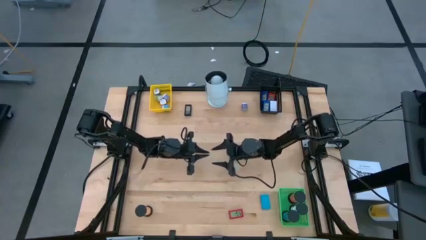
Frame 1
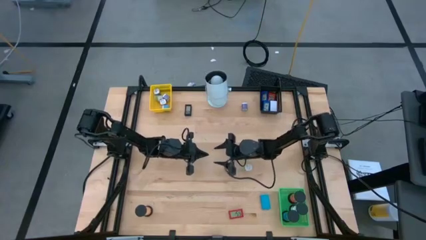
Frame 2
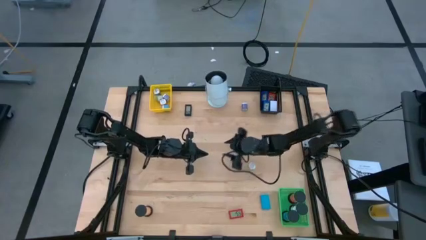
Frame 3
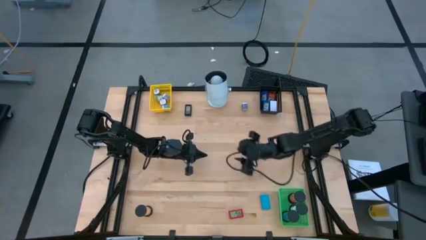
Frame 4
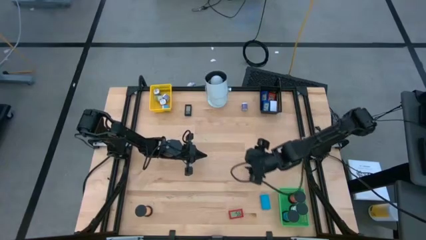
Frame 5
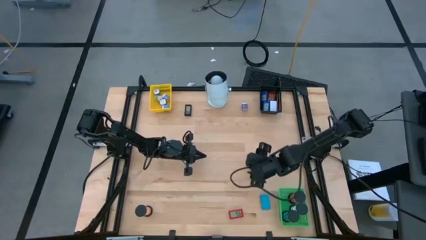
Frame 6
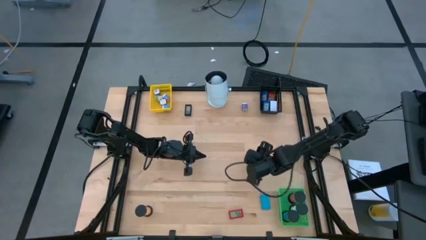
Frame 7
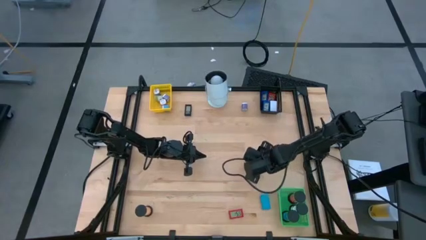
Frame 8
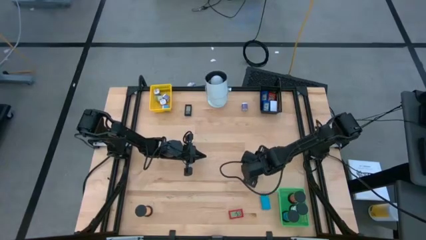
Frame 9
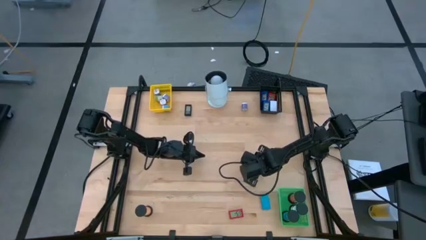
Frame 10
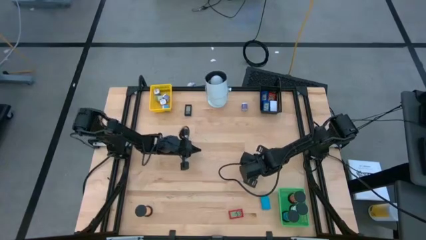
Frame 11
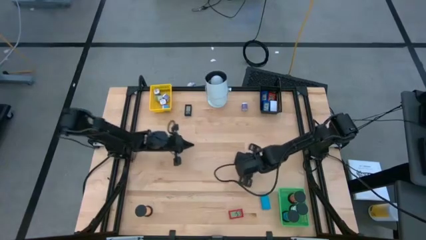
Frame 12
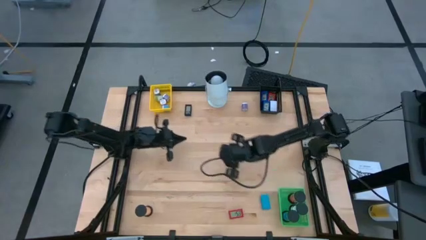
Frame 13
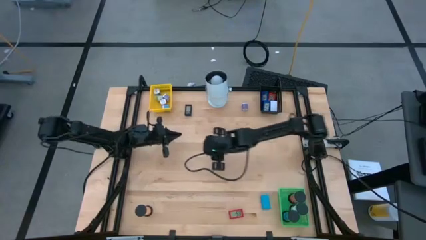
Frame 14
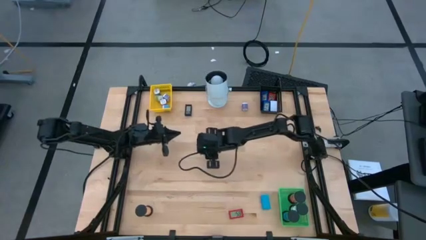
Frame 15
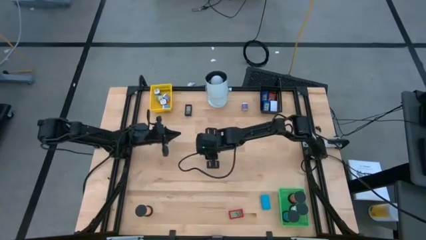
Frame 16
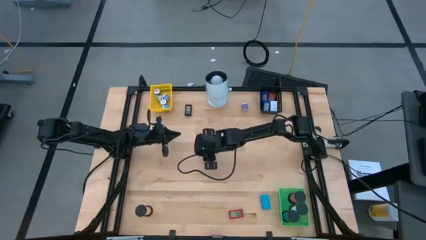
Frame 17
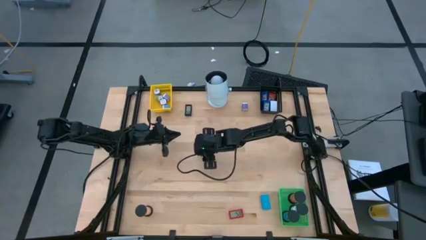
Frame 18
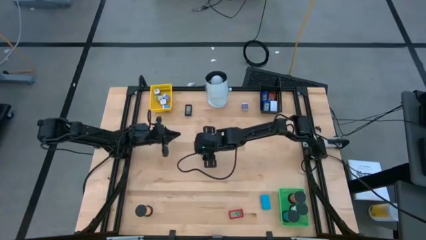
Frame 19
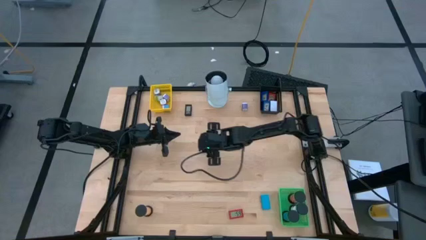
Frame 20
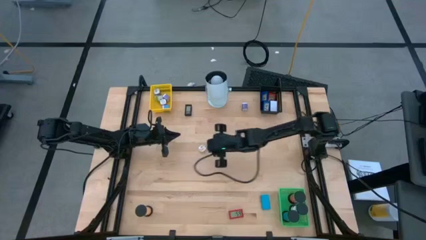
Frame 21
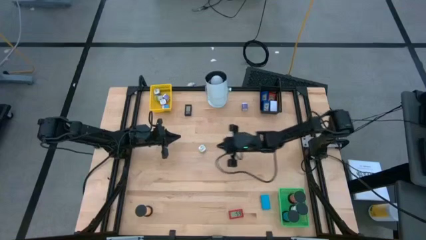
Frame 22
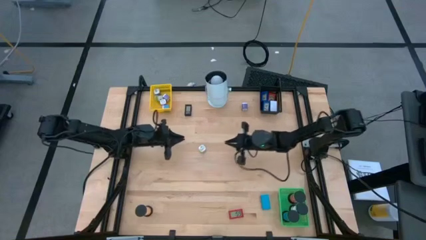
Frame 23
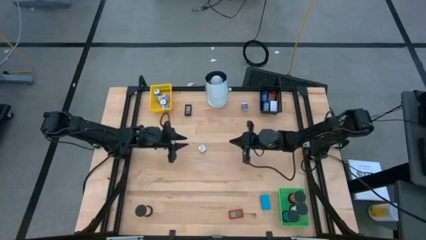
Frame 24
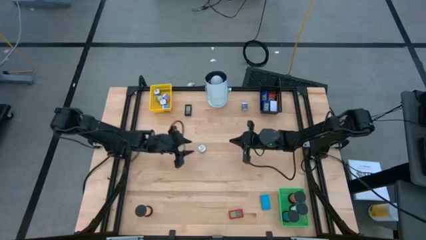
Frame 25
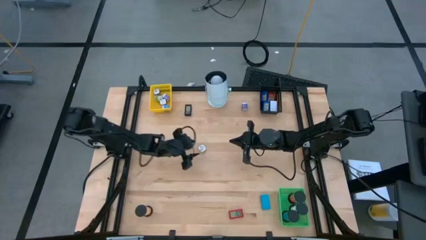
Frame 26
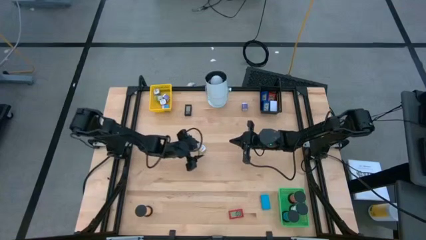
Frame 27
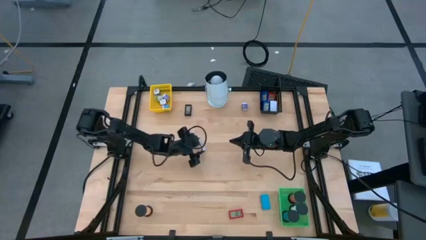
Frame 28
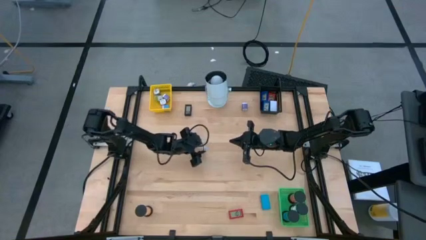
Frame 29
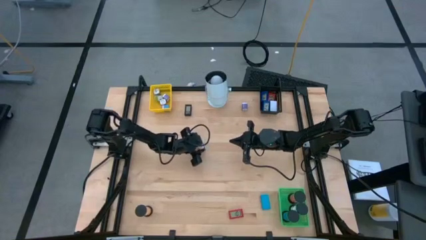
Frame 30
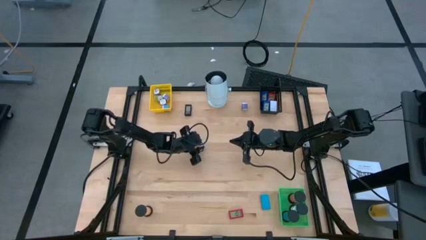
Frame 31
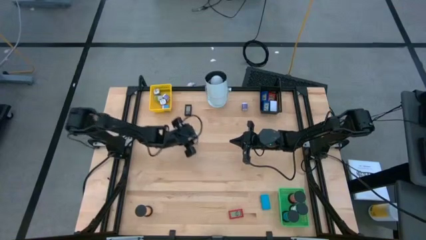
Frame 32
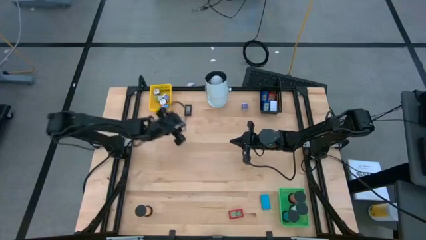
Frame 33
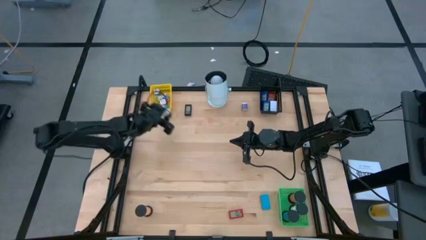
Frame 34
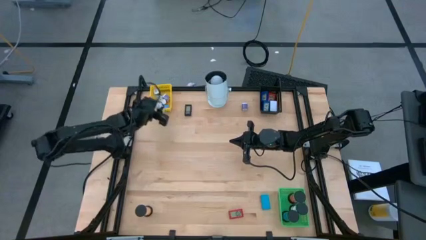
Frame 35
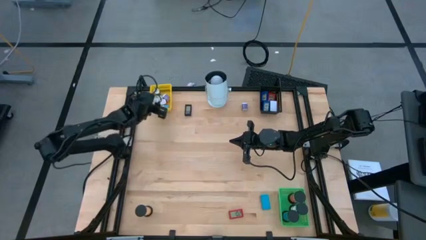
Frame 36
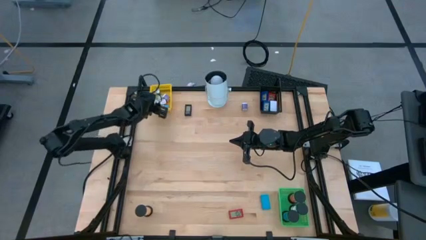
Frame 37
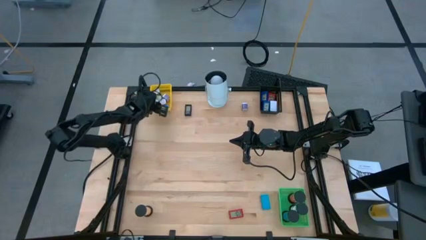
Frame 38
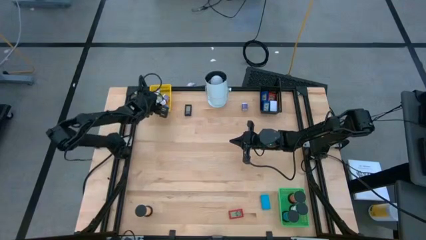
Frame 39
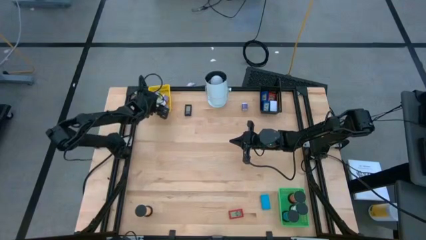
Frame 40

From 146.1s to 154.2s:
Task: Pick & Place Office items
Put the green charger adapter into the yellow bin

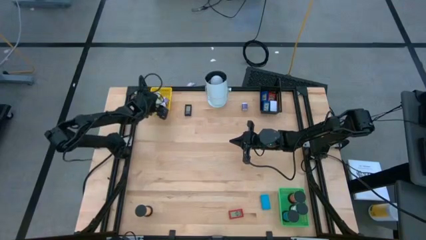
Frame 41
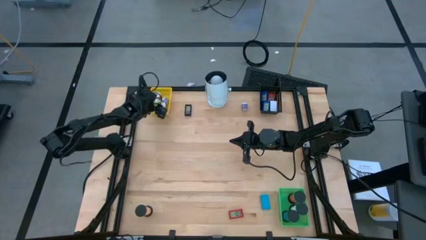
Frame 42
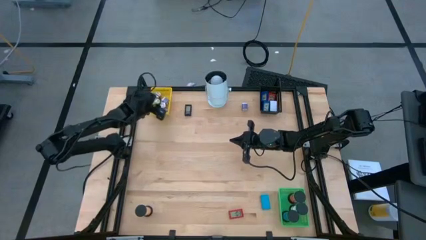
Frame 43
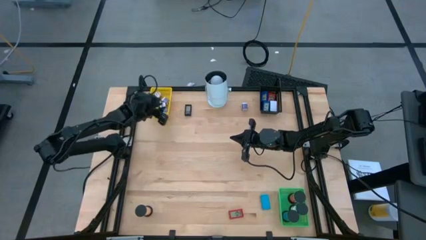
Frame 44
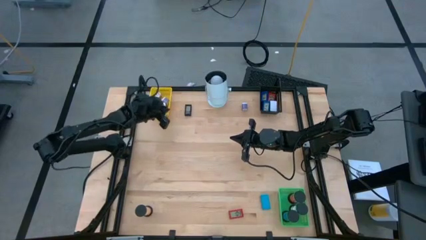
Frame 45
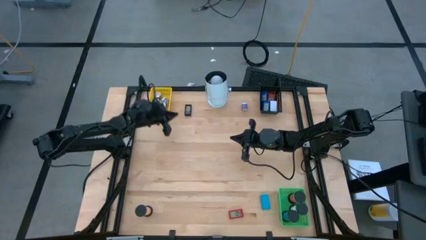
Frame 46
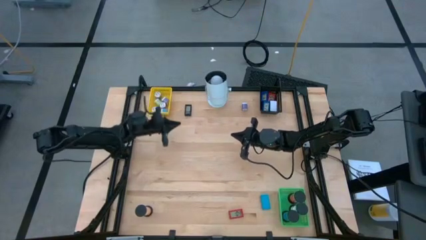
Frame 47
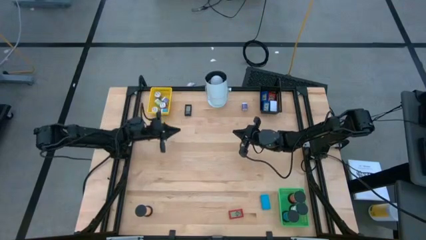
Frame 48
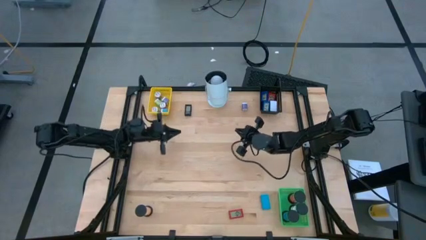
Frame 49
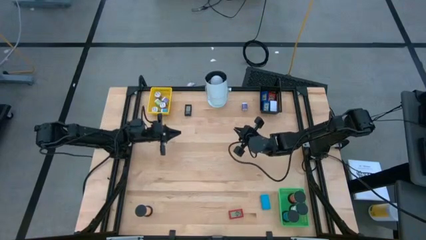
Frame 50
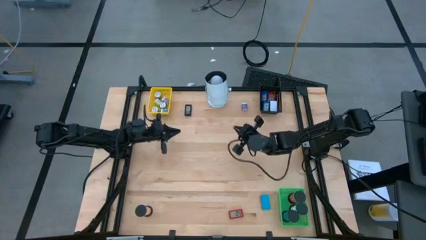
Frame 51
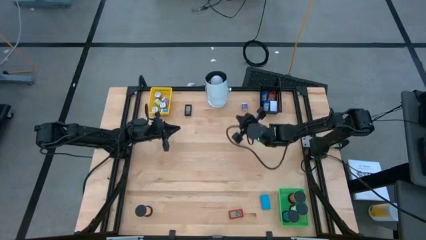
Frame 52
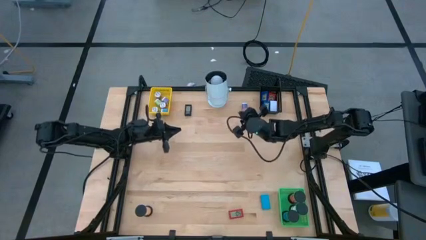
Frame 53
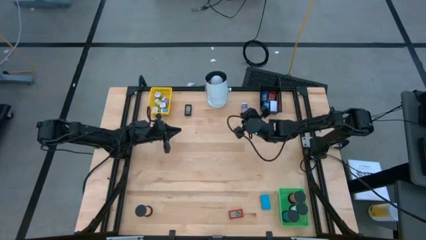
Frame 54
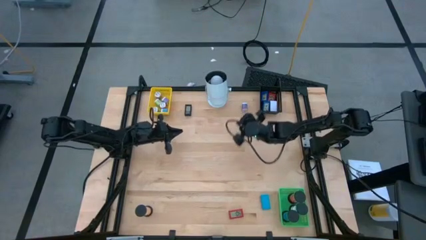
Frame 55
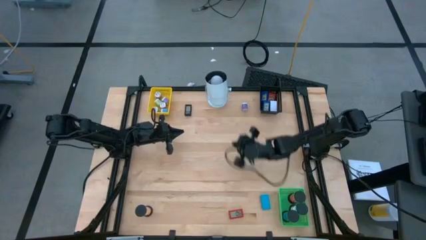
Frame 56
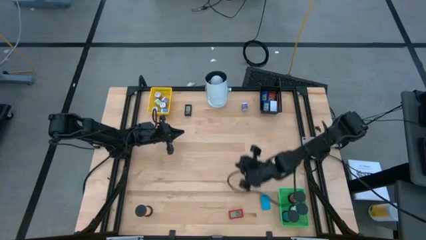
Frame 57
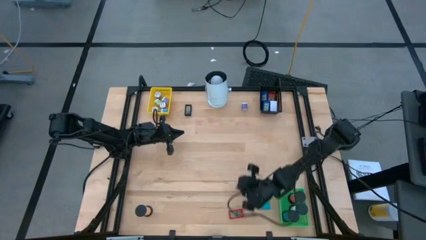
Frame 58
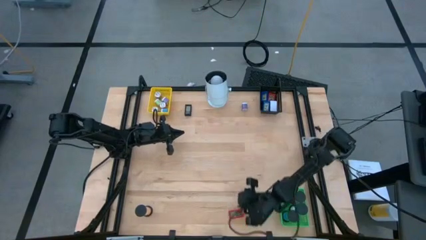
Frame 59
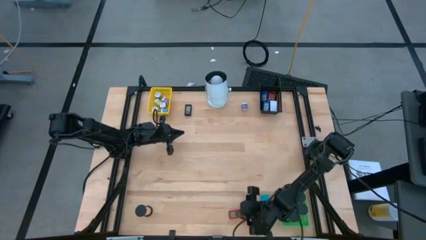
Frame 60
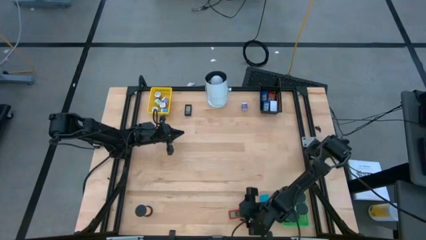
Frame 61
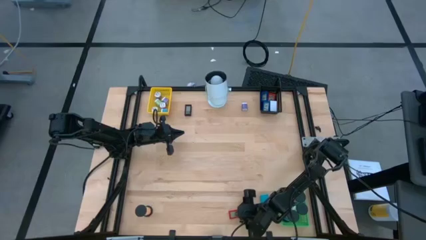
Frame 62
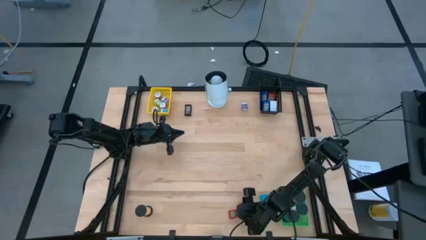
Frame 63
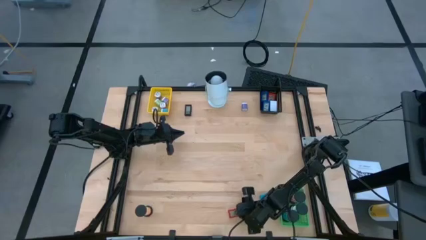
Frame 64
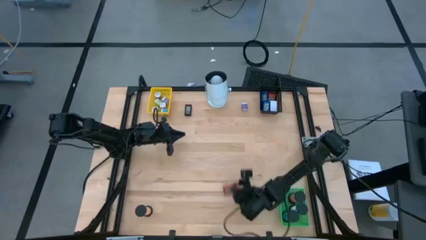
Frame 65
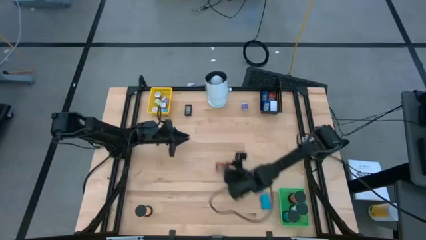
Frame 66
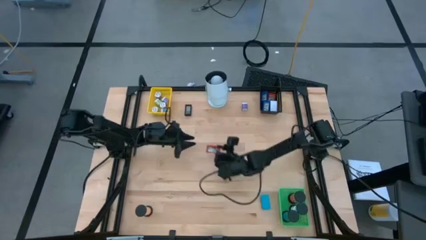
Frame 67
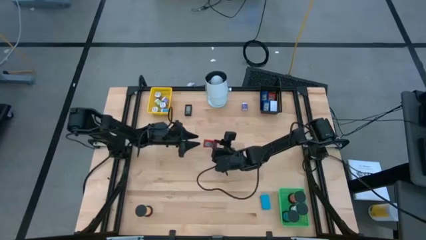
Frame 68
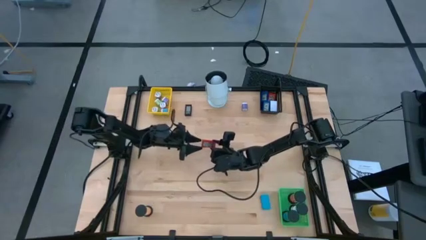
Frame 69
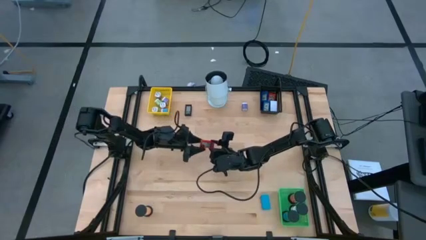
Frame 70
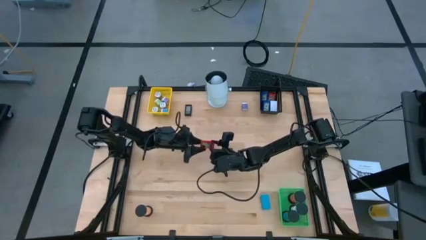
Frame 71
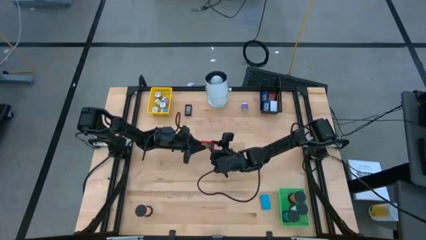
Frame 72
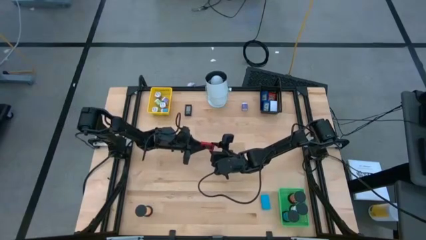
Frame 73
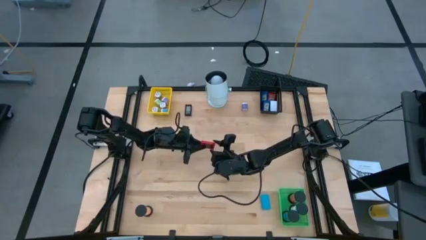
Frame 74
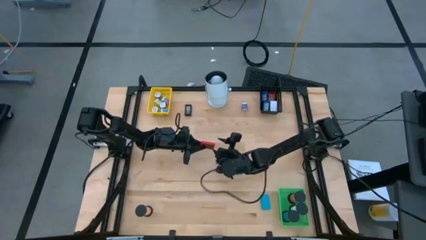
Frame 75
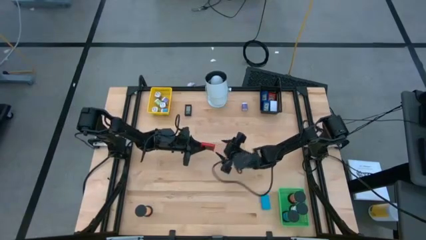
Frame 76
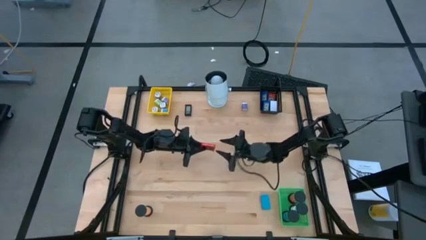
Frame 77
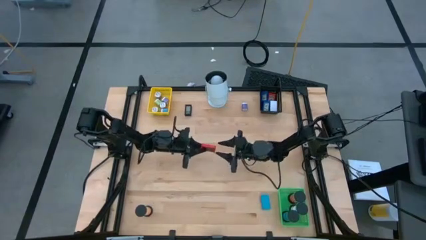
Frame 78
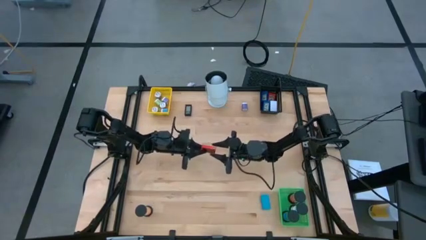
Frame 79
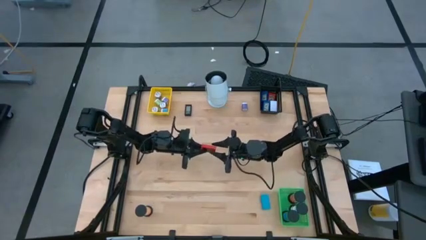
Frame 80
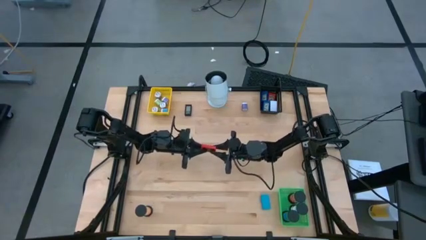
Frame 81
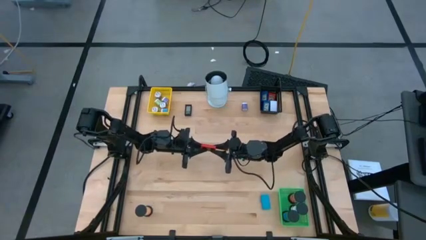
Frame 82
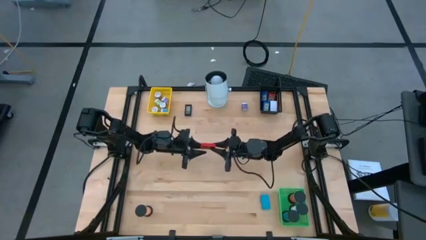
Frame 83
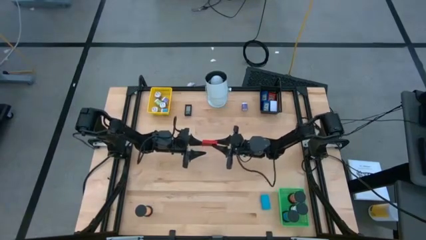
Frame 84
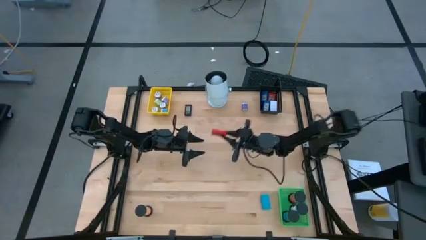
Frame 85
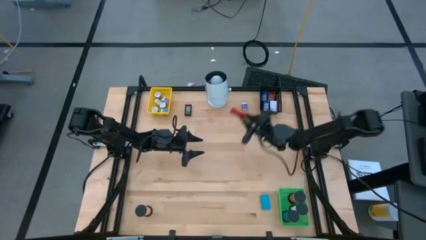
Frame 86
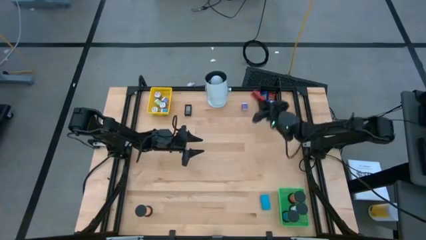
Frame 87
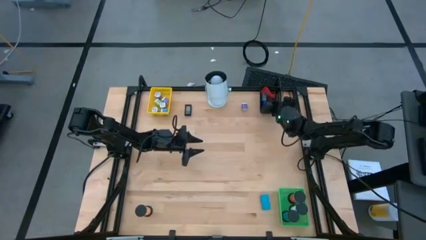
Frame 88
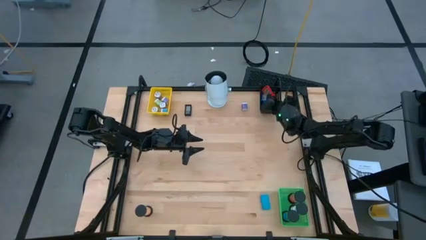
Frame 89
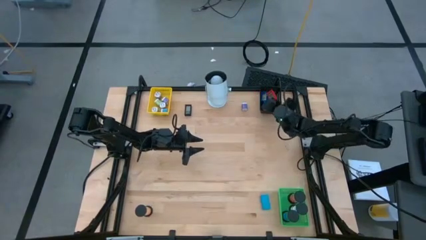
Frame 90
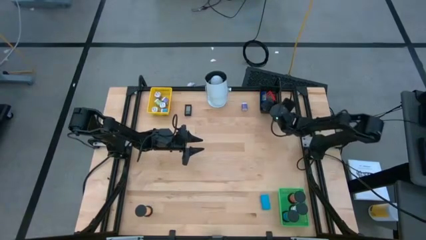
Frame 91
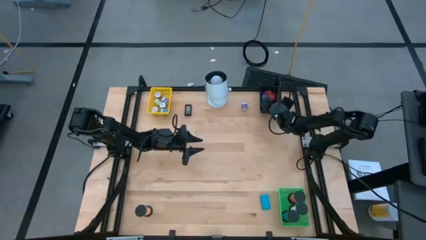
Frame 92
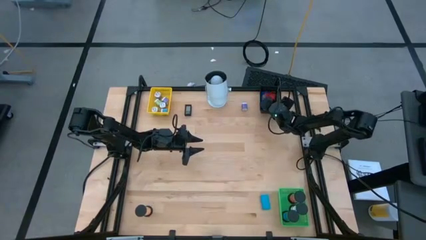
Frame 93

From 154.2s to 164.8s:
Put the red timer into the black bin
